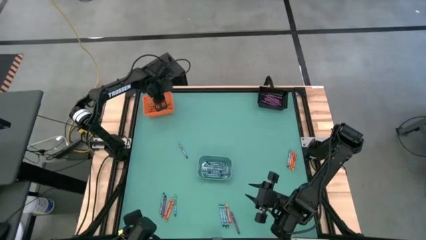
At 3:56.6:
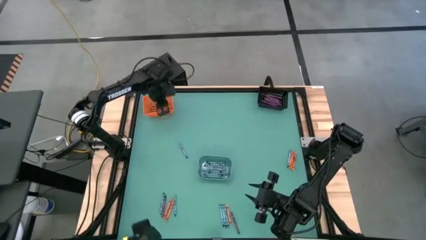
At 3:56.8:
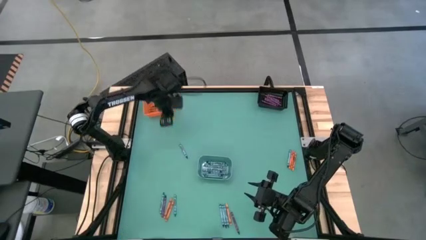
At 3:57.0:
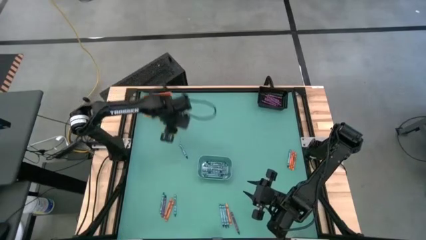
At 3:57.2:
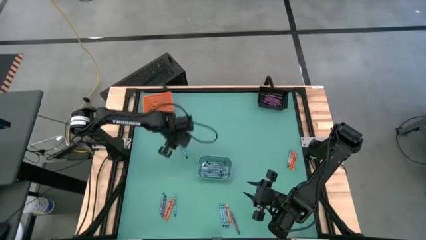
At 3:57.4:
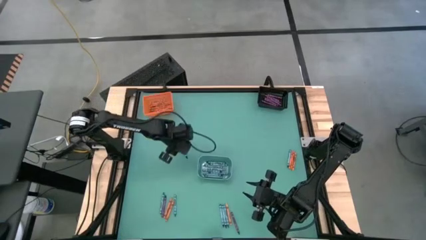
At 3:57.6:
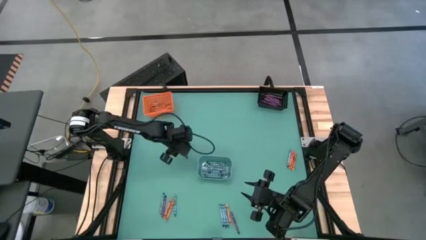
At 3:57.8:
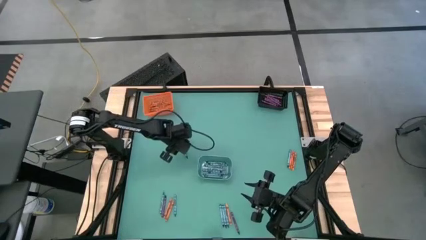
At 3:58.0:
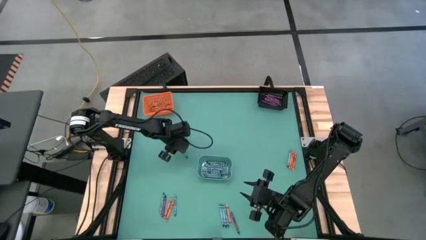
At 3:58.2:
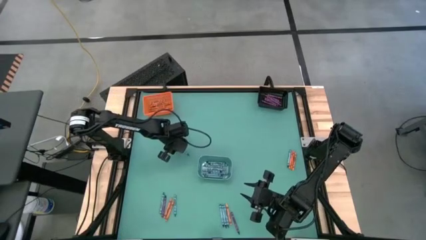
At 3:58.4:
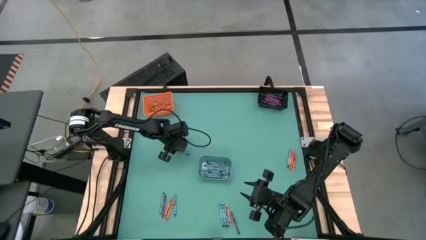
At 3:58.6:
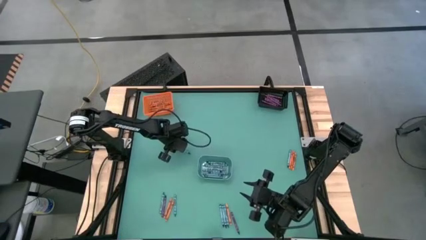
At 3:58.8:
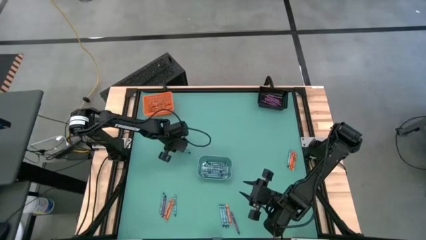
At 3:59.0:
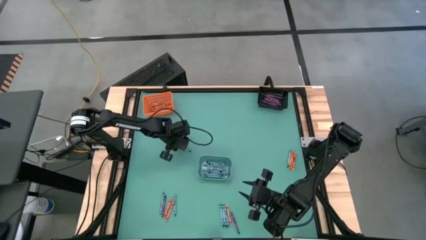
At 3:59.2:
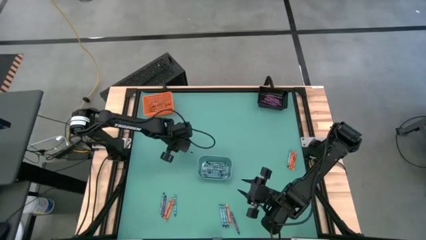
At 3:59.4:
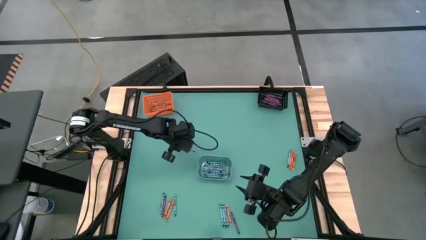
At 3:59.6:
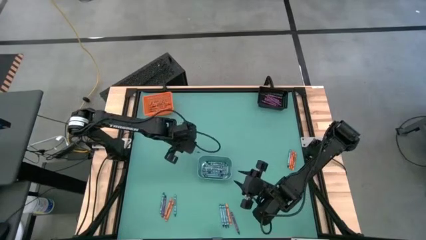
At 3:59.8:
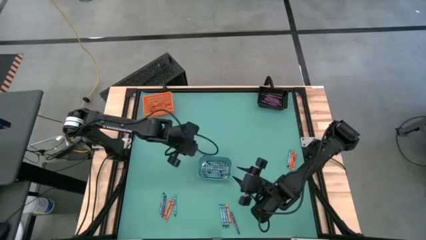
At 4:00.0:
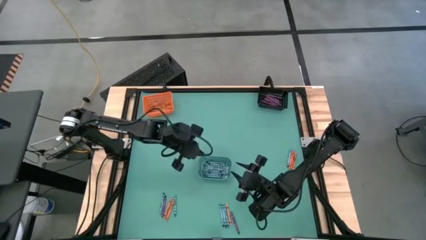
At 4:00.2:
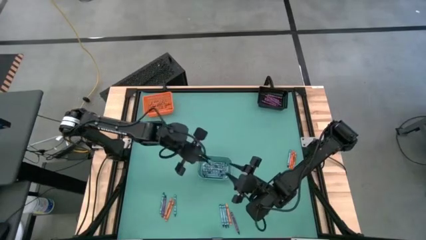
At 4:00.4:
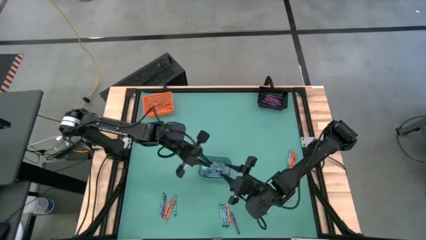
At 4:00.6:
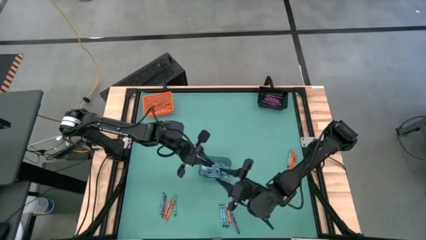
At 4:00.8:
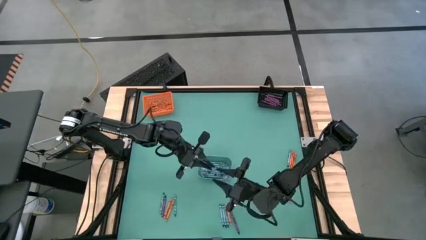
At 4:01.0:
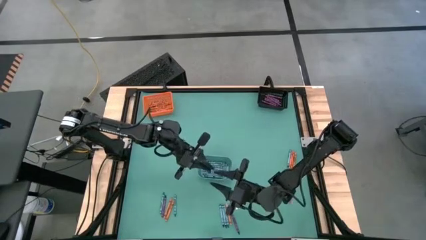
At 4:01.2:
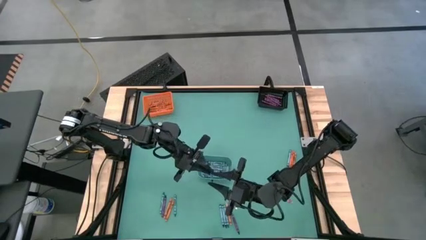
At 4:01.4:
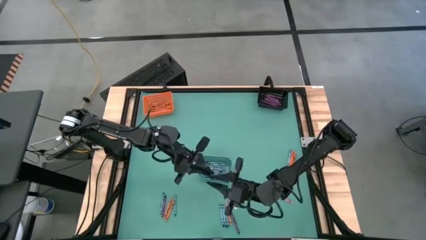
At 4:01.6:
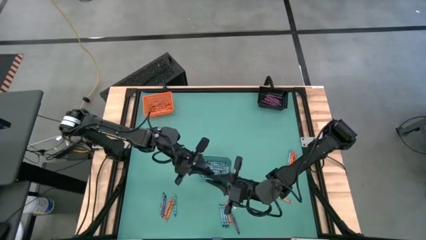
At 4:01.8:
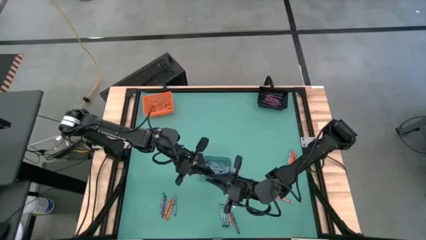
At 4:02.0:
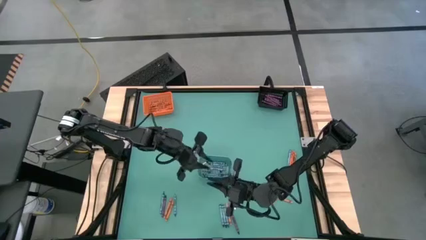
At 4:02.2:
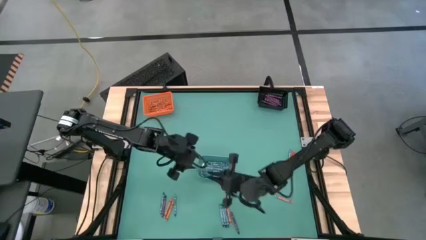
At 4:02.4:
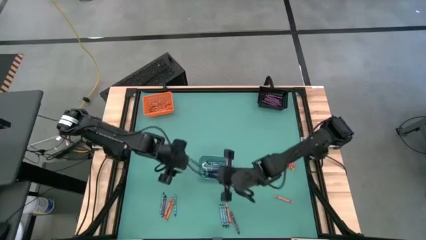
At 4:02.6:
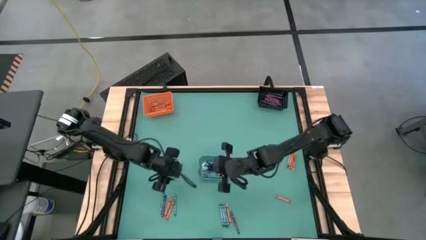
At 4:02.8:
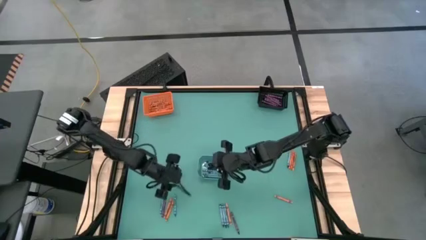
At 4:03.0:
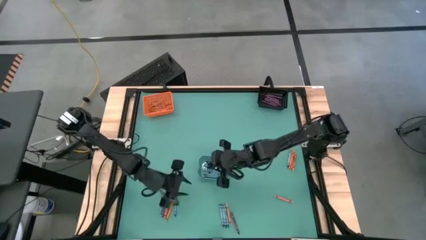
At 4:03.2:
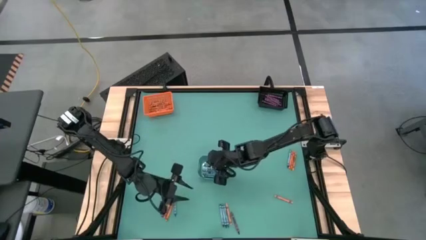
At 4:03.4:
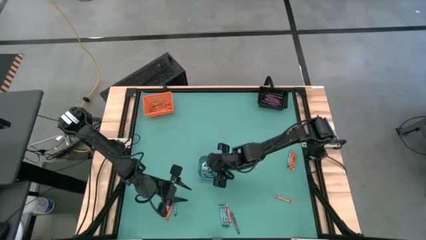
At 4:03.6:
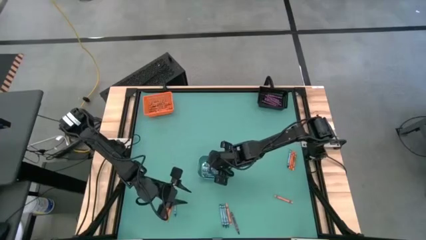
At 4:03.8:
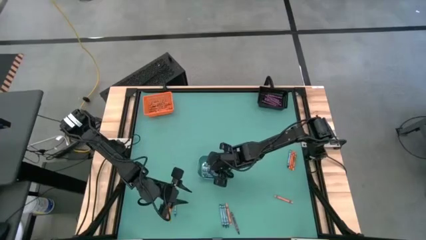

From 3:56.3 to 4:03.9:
Task: Sort crayons
Put the blue crayon into the blue bin

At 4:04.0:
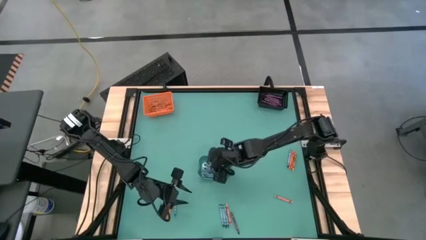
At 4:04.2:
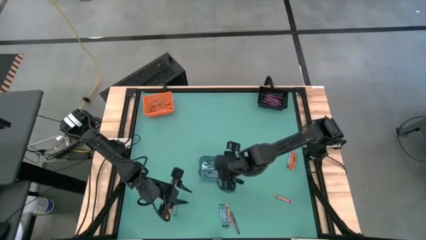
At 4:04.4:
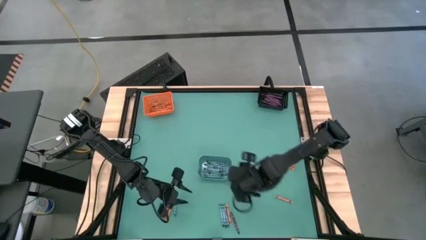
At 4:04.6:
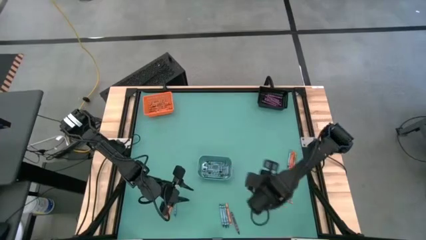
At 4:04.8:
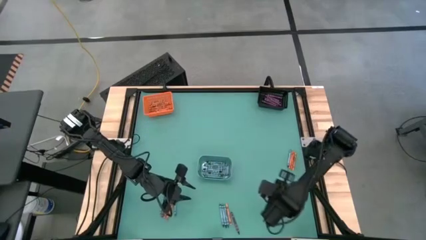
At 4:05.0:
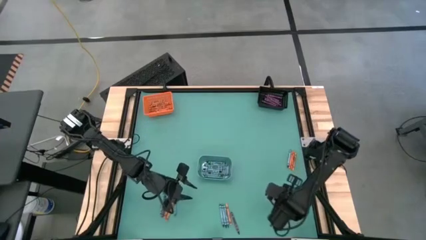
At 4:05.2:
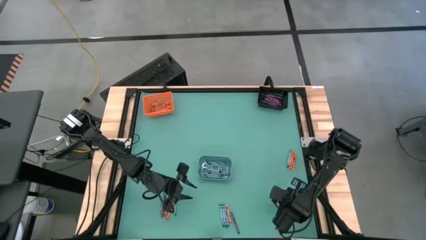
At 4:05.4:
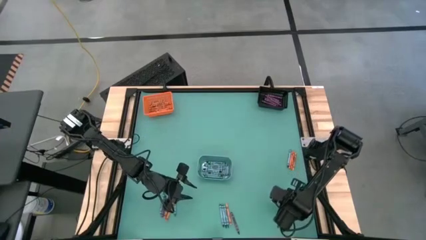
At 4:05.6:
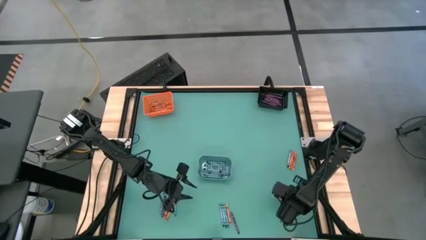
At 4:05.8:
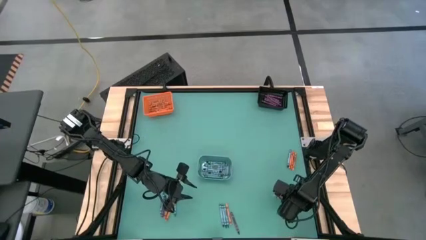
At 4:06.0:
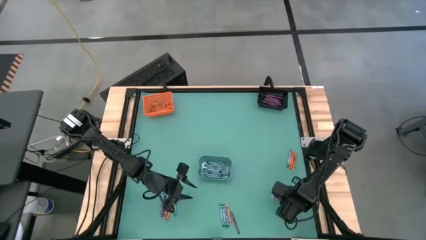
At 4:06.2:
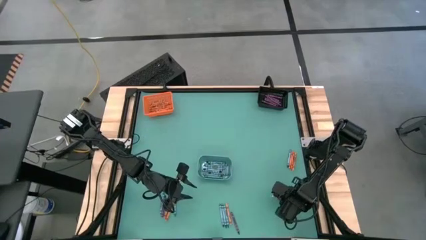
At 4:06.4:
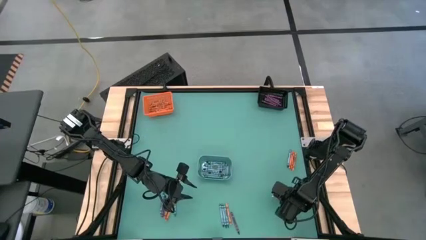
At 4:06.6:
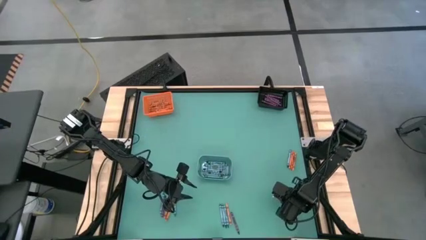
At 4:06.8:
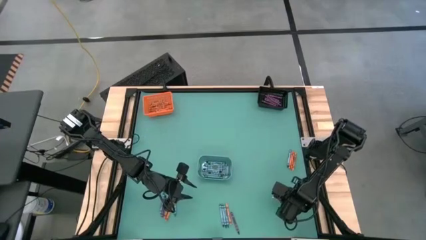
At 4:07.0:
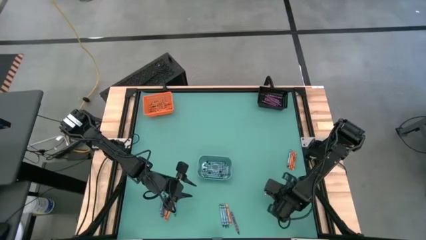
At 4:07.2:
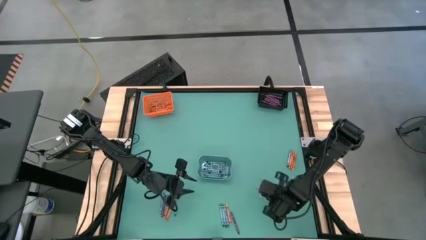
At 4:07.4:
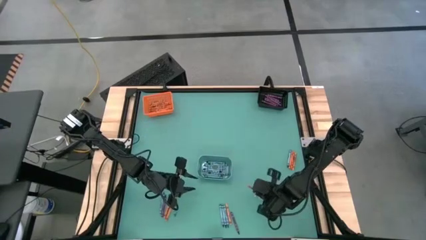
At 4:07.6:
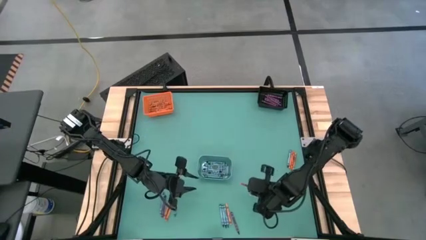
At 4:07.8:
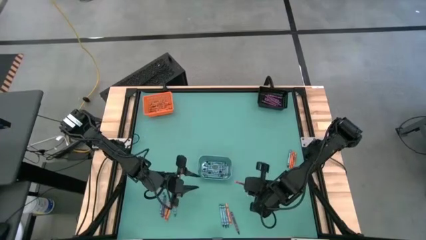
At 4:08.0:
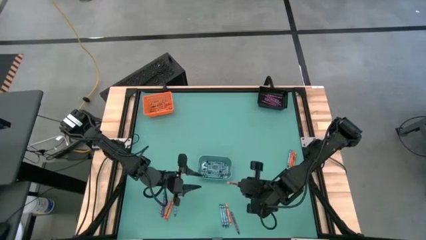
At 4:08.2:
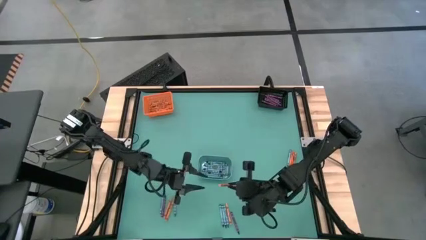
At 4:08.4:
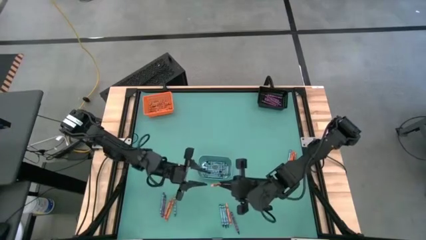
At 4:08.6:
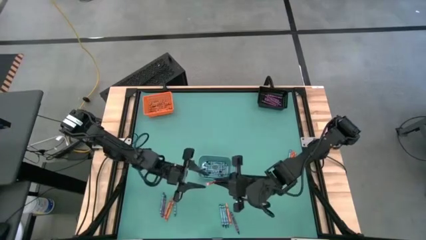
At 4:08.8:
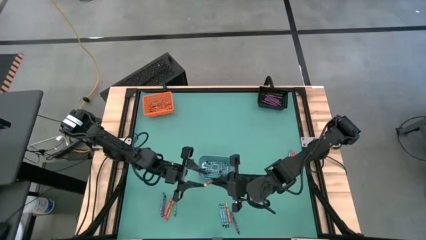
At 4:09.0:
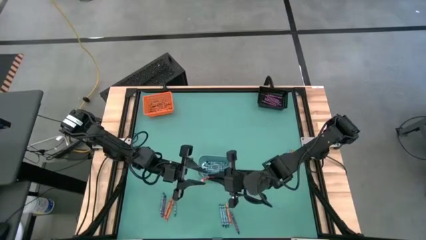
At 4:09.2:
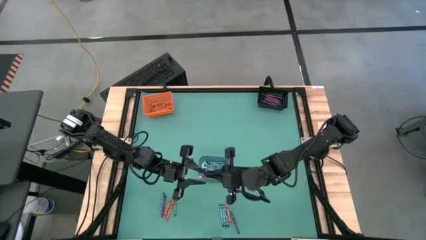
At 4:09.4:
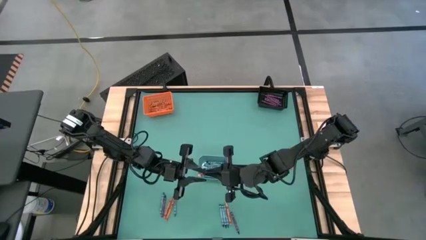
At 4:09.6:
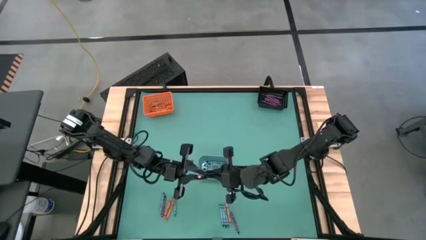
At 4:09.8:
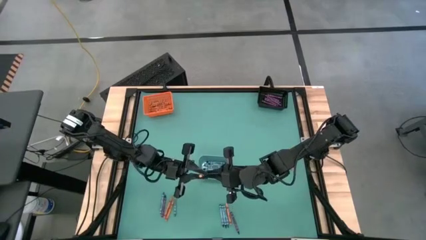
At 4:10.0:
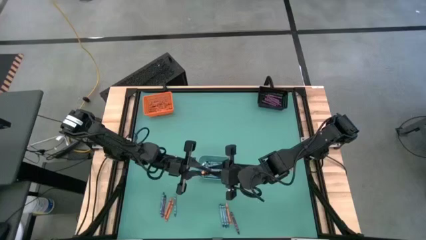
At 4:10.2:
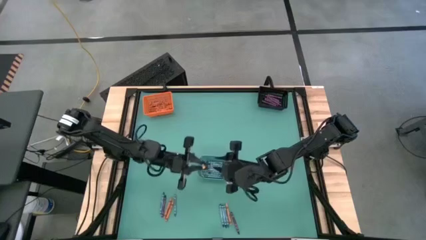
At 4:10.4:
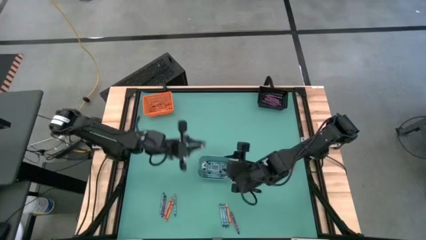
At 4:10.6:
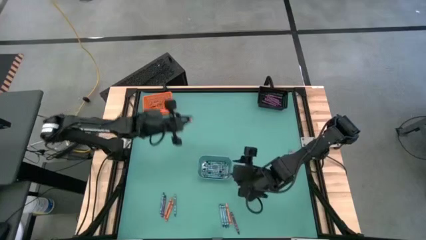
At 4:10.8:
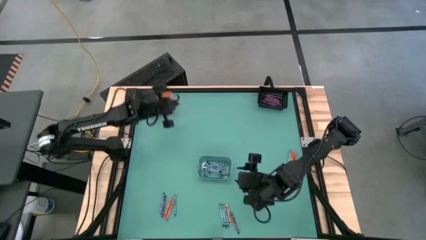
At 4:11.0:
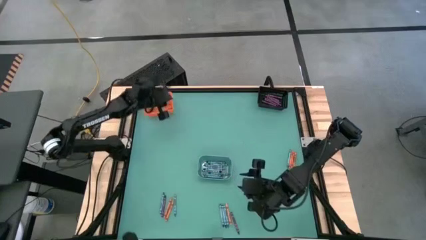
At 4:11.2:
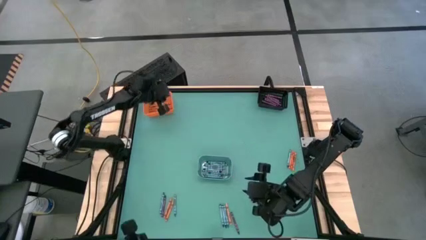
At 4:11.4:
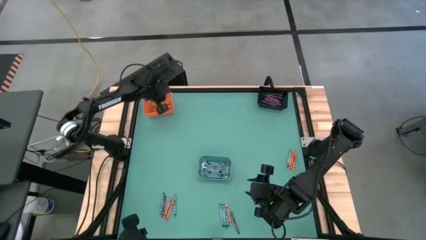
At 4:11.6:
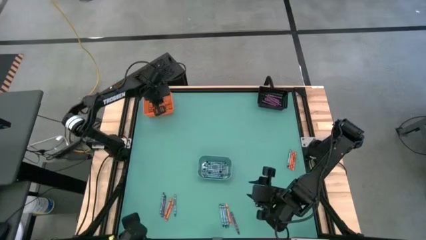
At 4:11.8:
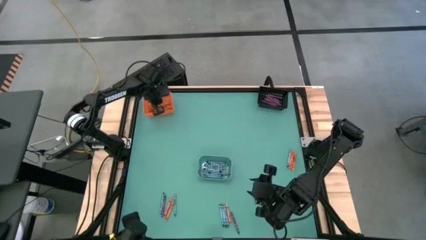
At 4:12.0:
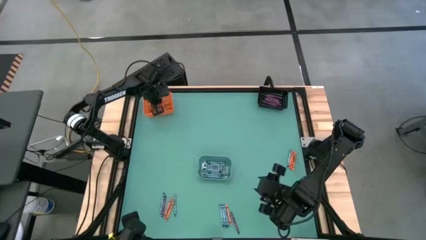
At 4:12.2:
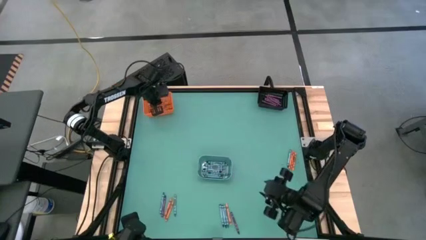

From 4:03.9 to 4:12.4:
Put the orange crayon into the orange bin
